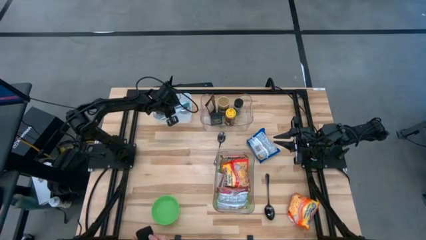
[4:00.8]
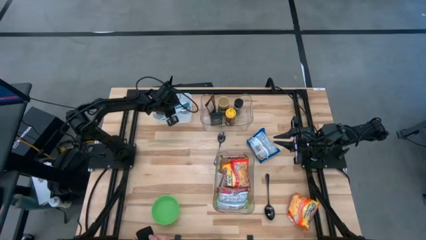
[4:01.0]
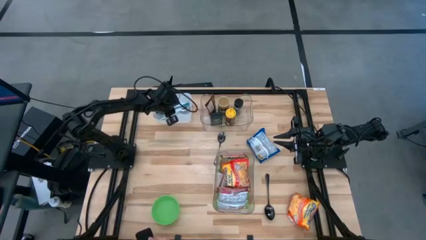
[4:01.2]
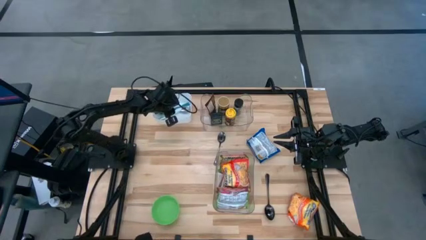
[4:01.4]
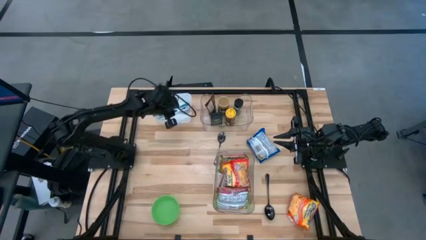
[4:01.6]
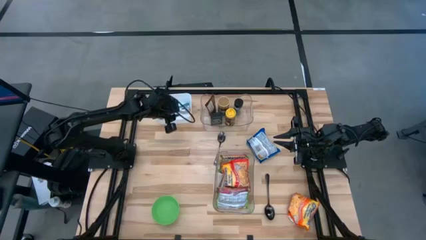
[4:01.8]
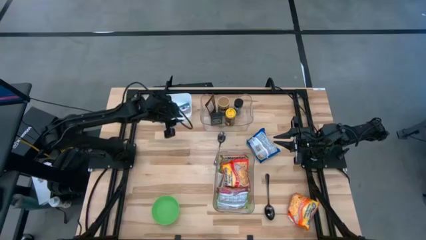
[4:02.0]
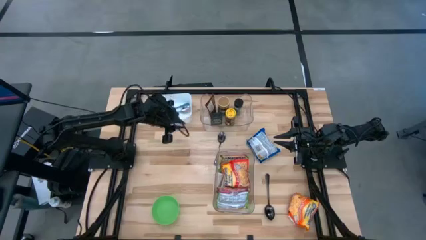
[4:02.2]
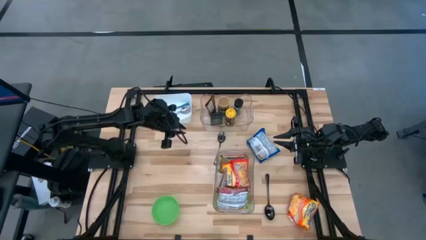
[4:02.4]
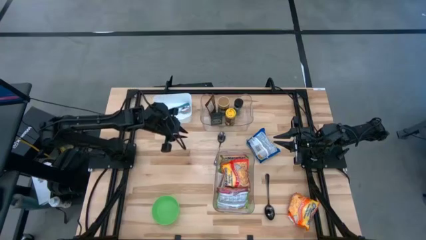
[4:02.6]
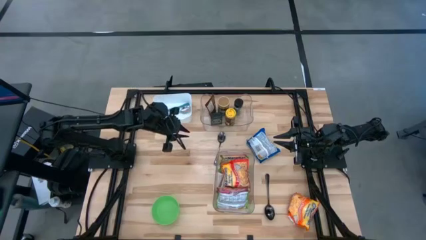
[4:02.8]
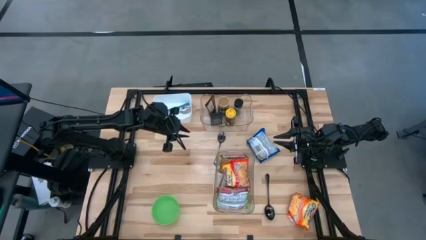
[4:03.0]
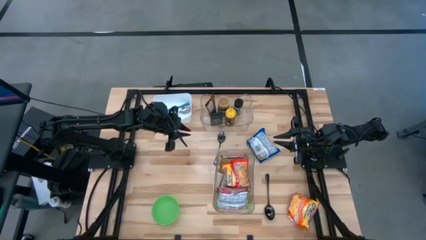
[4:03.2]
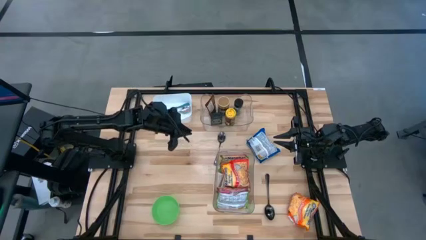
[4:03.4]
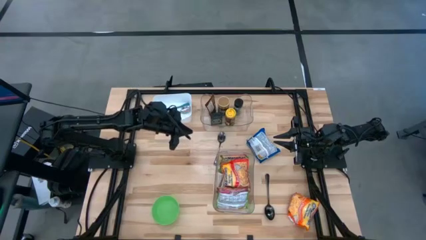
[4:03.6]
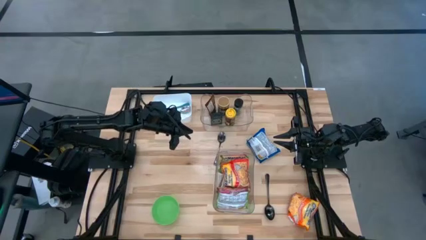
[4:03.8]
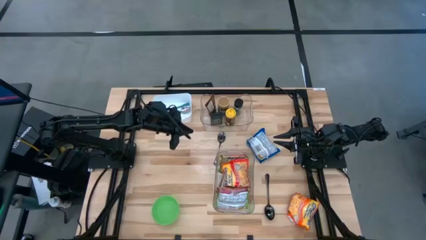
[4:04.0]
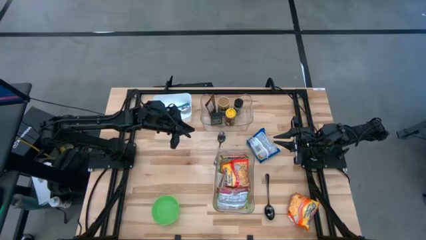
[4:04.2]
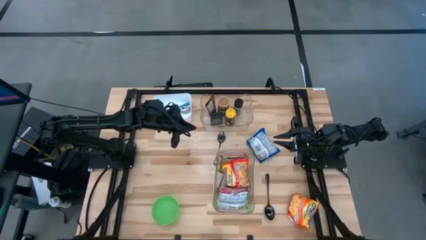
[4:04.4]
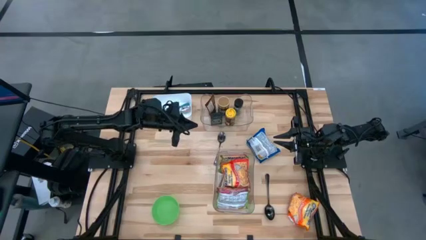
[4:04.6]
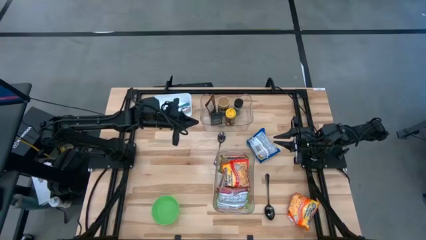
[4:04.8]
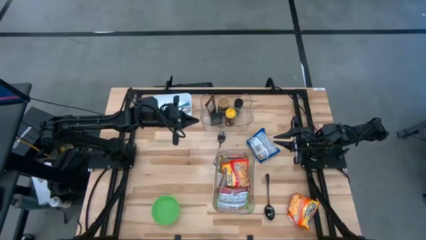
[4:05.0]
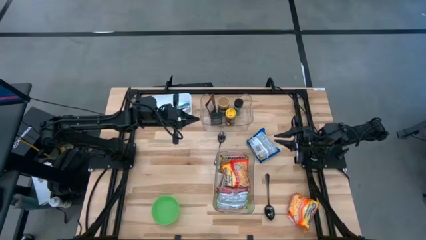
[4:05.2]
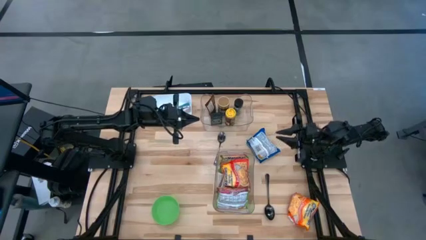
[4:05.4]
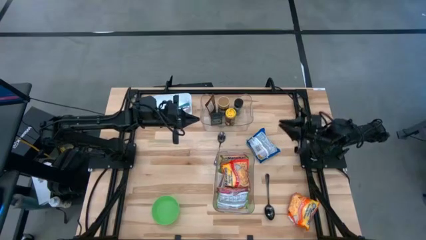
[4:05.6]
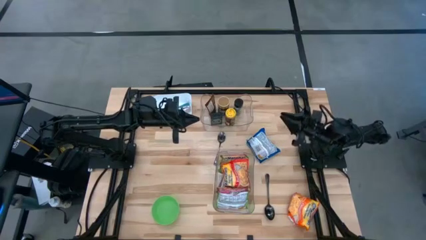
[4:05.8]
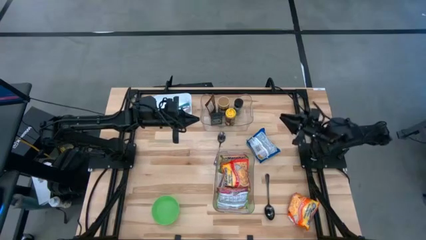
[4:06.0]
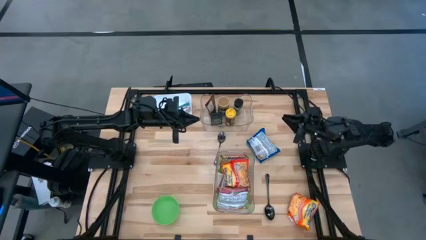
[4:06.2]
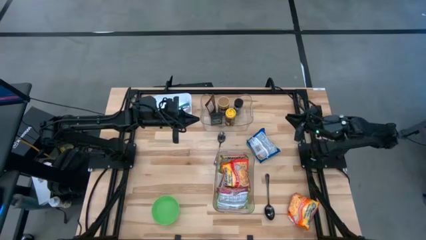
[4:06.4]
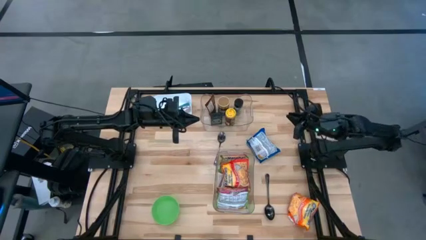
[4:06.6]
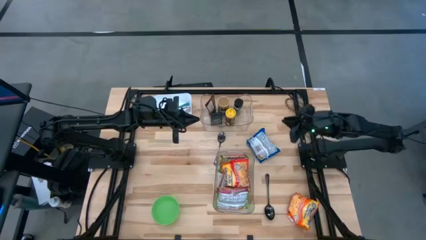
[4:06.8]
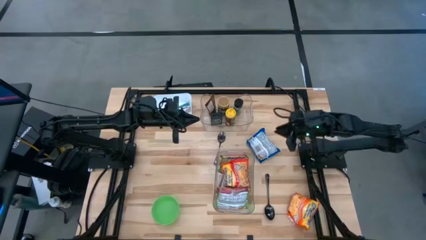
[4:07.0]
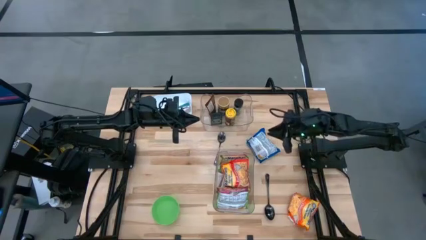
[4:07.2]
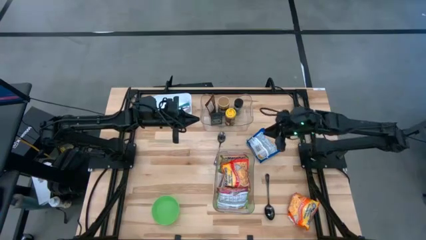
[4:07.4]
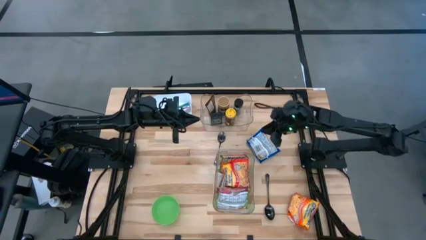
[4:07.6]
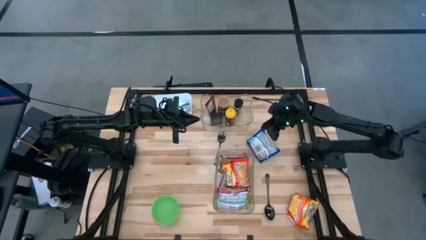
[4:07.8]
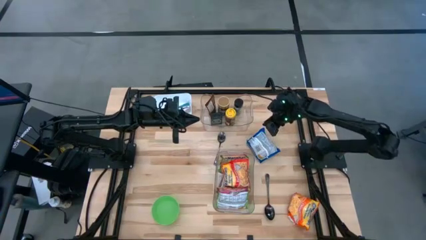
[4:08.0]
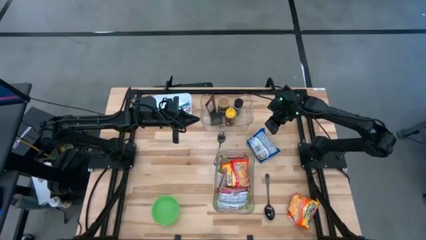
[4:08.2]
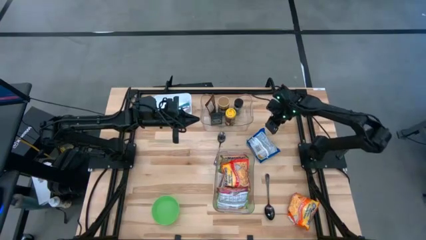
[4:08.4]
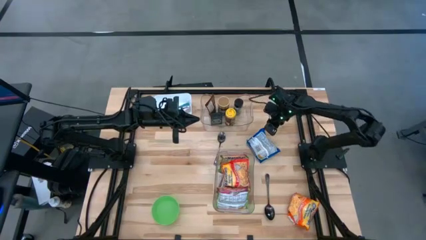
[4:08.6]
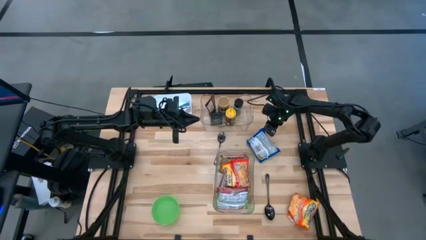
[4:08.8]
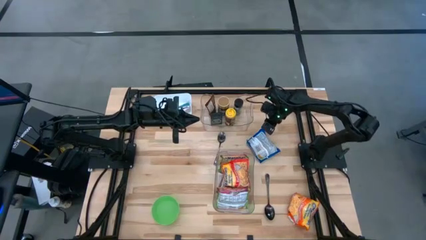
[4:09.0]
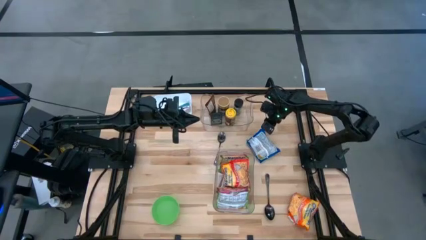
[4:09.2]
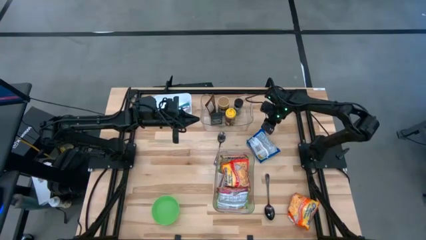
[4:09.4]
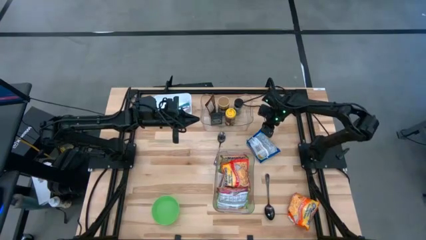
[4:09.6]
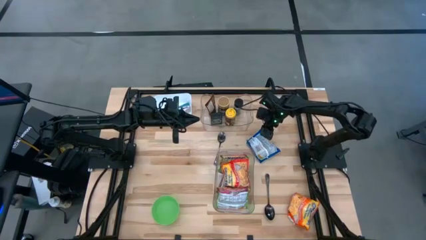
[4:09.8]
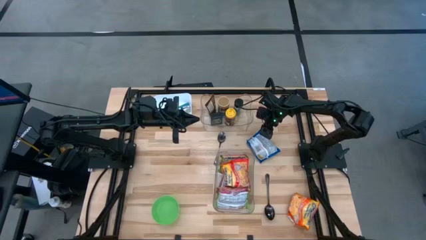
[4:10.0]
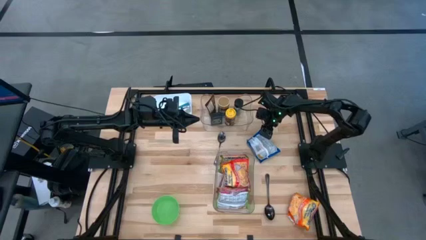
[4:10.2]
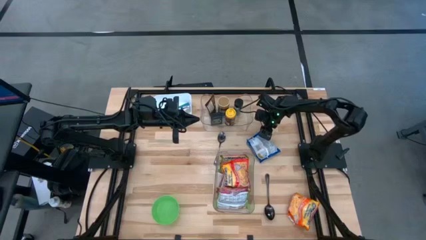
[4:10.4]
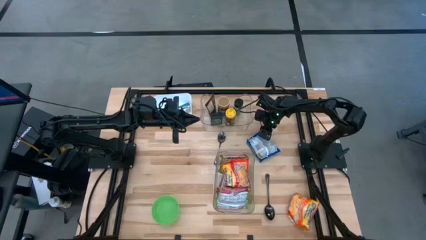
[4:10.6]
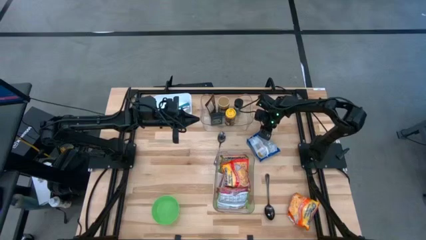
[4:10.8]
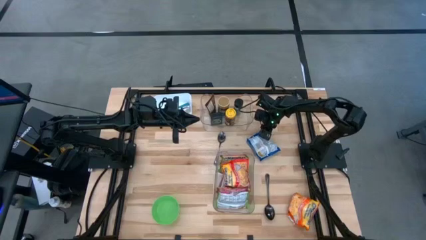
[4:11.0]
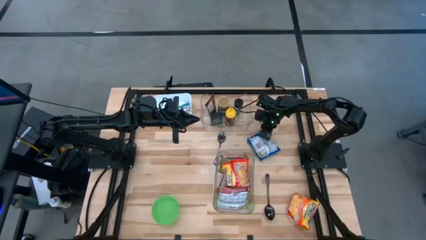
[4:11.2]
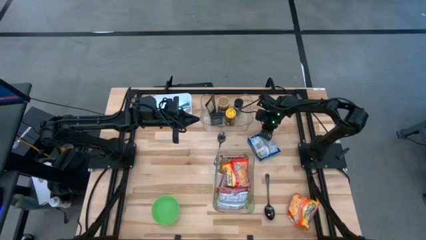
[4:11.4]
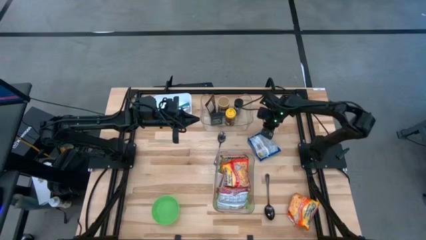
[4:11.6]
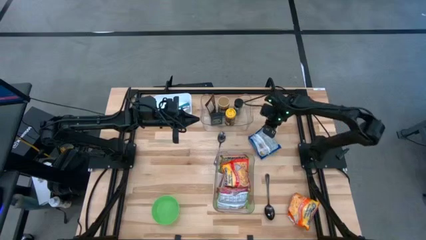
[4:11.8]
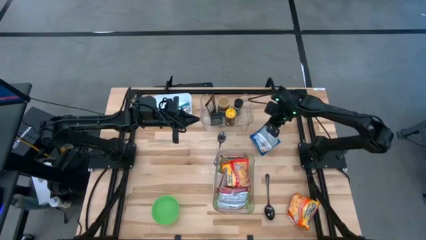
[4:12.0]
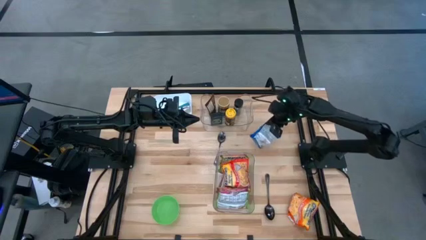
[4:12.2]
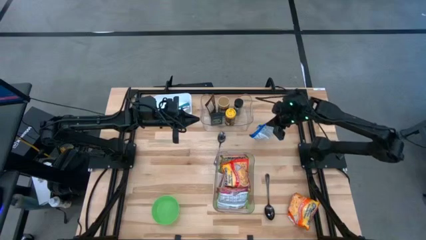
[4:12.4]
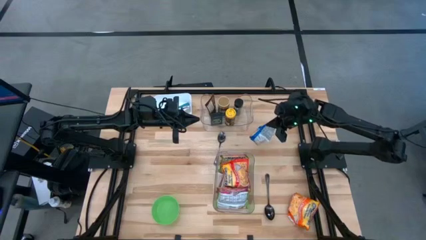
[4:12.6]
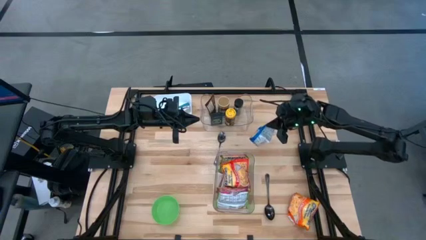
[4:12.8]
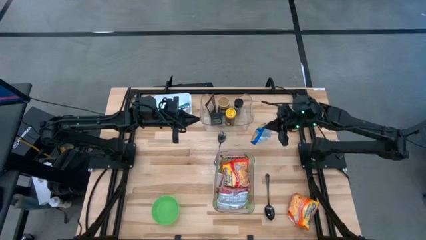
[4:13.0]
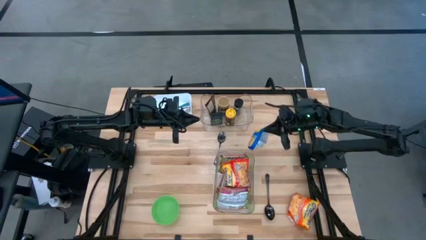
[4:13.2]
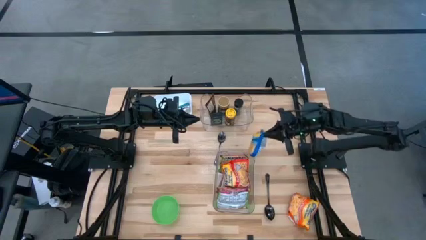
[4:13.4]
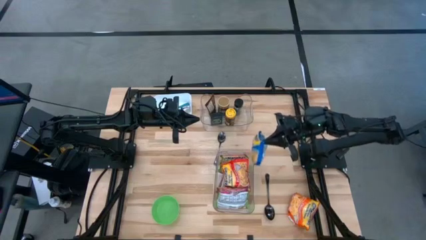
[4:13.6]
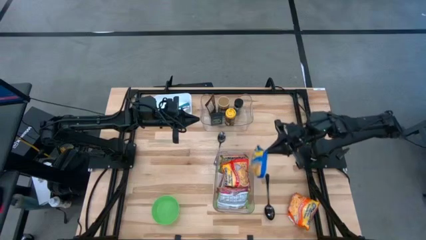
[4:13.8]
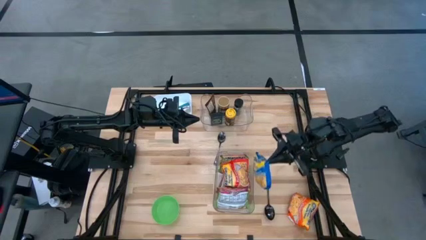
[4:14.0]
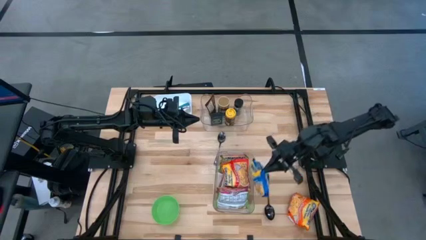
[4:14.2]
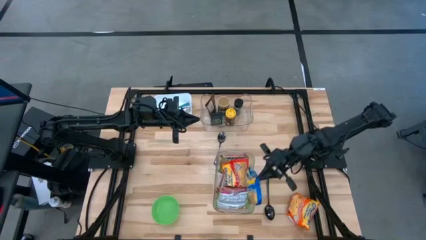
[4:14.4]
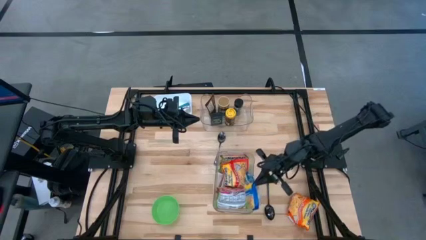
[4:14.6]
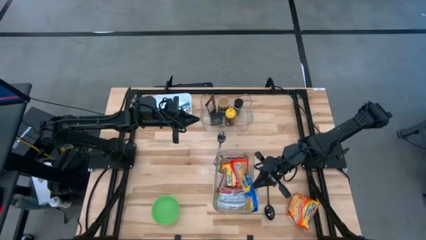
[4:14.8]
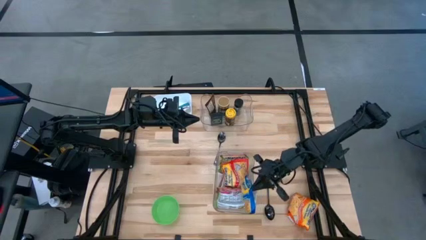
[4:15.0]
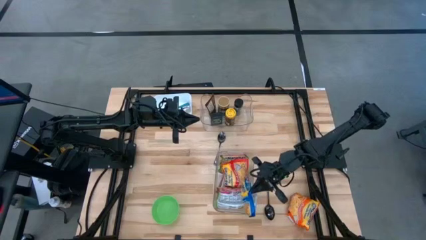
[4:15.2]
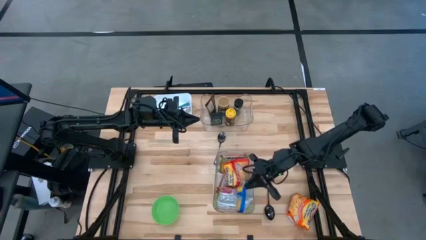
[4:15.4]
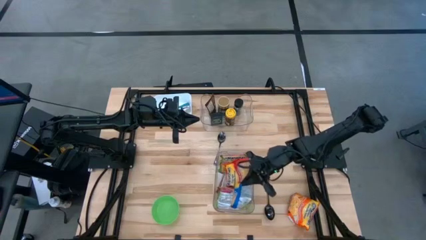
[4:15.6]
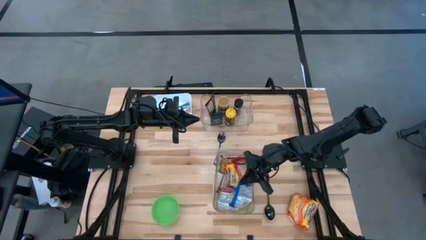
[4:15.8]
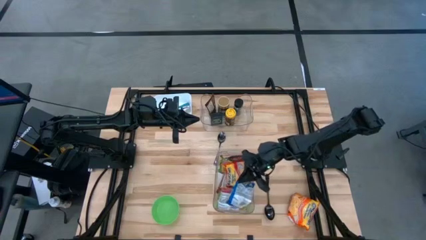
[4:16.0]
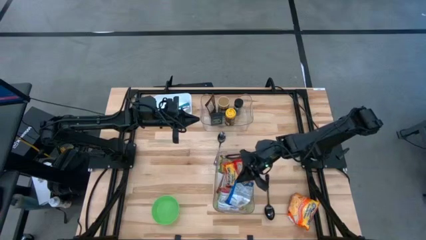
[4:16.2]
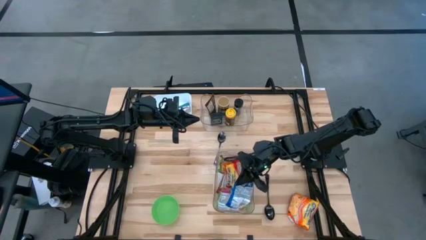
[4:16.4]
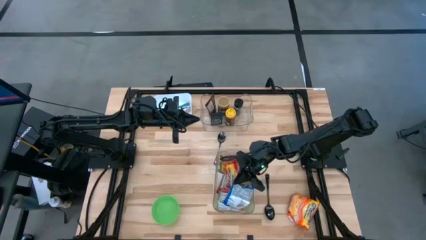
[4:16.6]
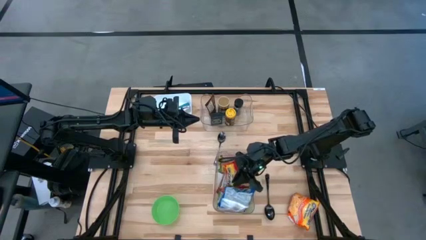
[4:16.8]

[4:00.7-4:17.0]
Task: Pick & Place Food Item
Put the blue noodle pack into the bottom transparent bin
